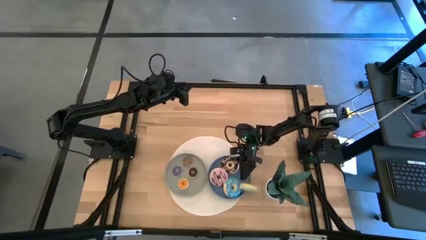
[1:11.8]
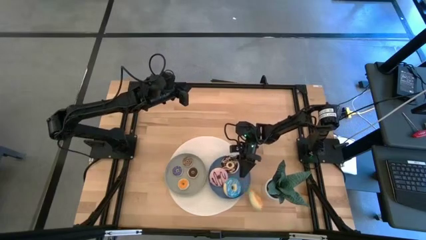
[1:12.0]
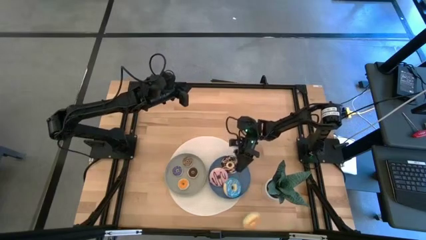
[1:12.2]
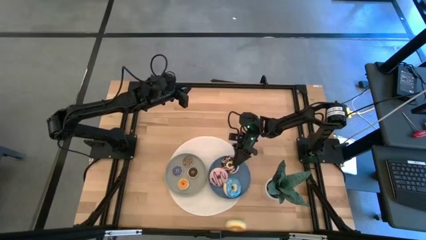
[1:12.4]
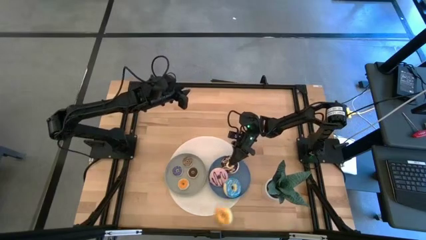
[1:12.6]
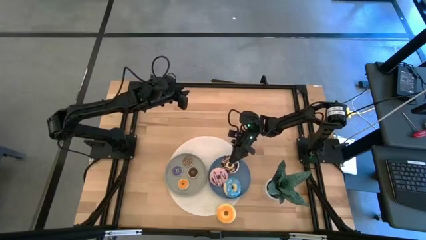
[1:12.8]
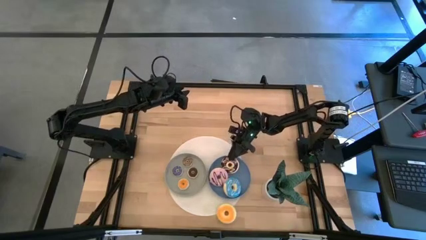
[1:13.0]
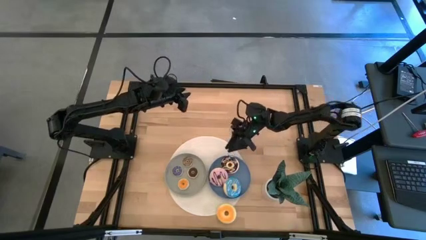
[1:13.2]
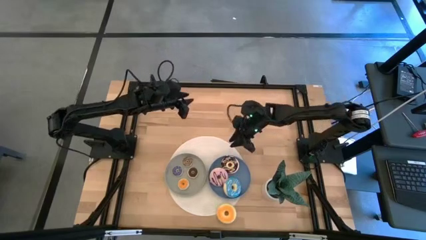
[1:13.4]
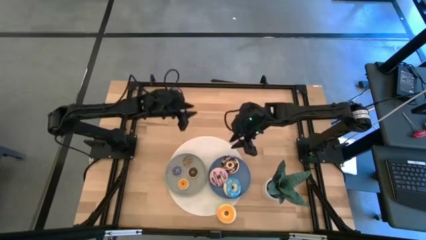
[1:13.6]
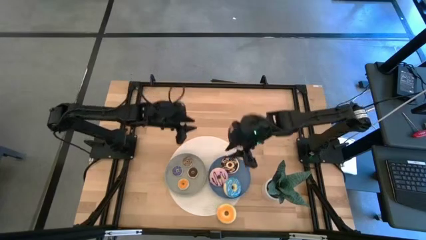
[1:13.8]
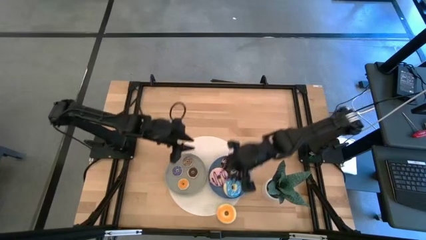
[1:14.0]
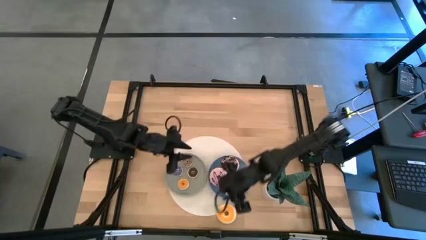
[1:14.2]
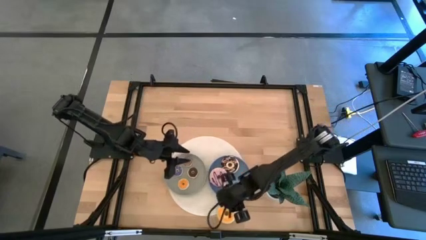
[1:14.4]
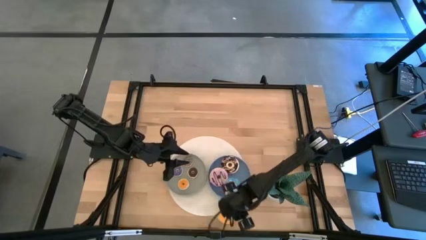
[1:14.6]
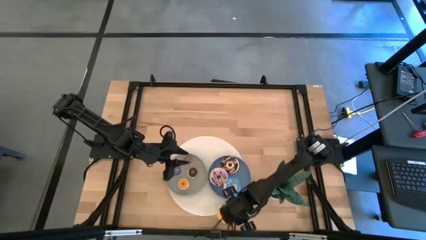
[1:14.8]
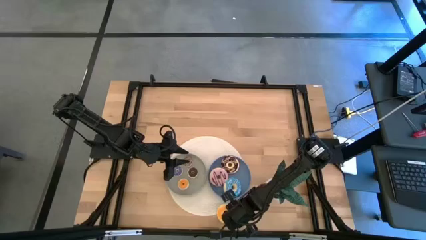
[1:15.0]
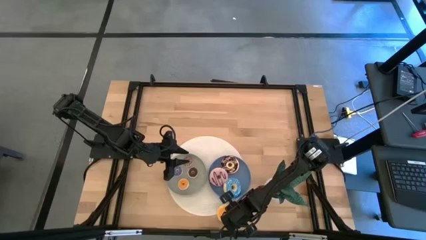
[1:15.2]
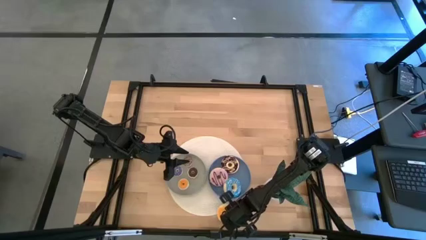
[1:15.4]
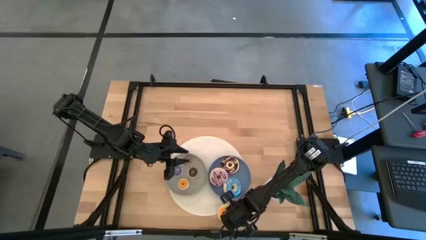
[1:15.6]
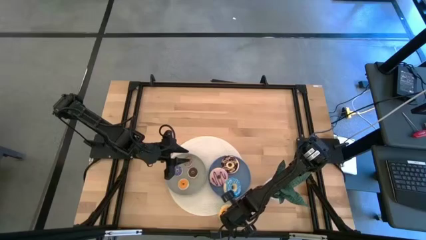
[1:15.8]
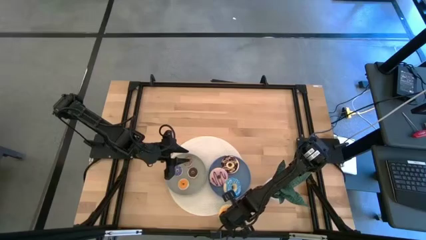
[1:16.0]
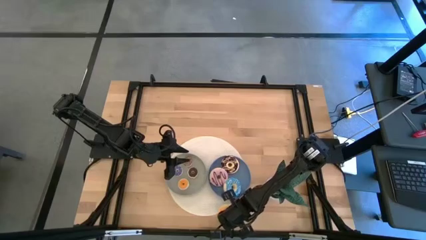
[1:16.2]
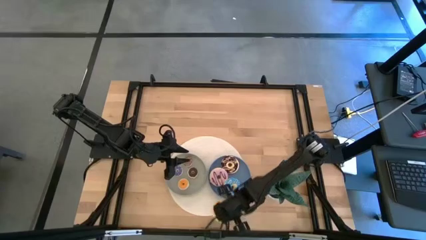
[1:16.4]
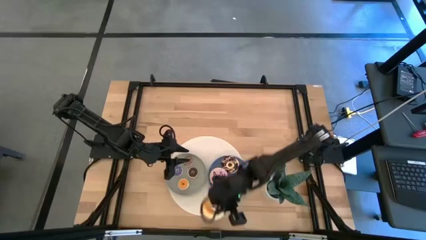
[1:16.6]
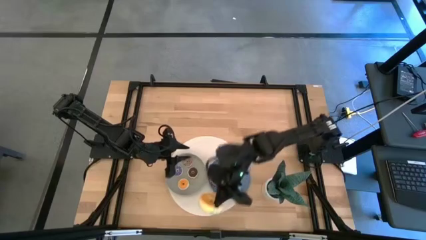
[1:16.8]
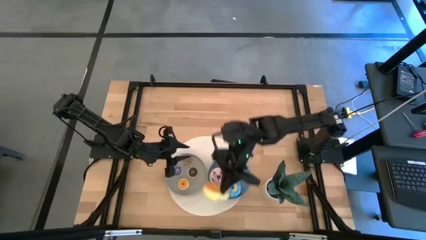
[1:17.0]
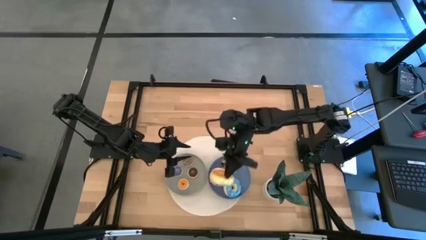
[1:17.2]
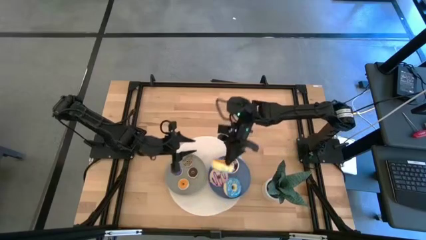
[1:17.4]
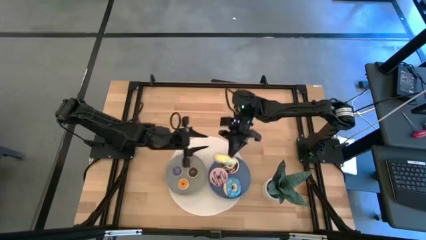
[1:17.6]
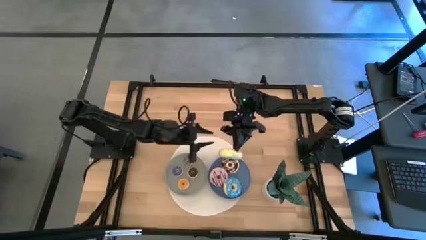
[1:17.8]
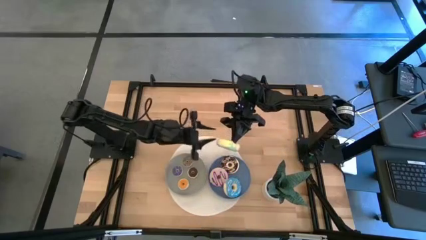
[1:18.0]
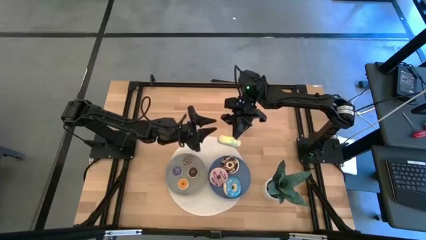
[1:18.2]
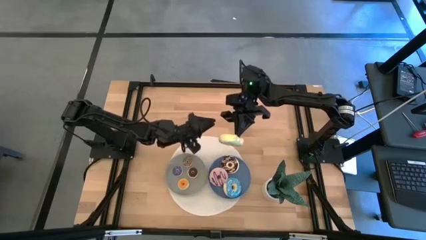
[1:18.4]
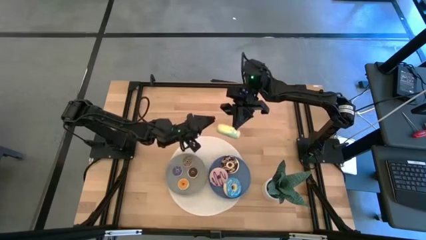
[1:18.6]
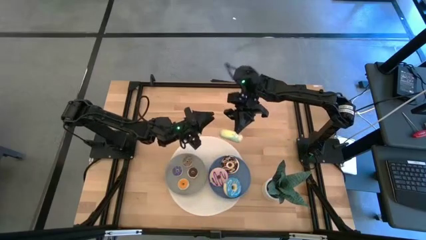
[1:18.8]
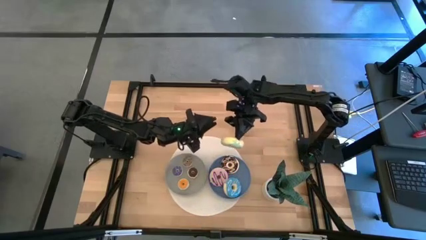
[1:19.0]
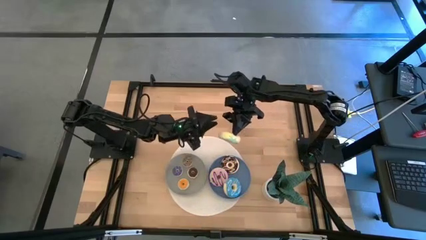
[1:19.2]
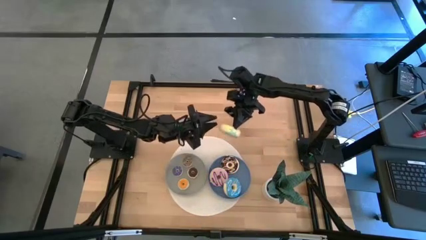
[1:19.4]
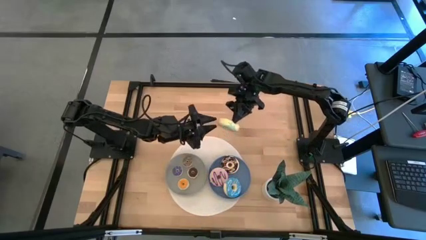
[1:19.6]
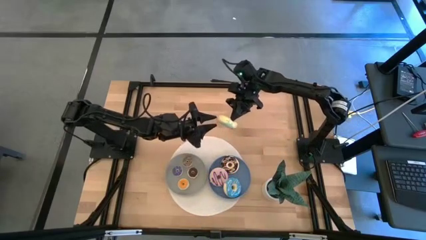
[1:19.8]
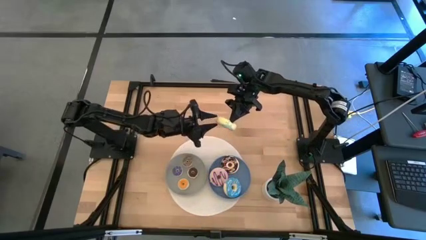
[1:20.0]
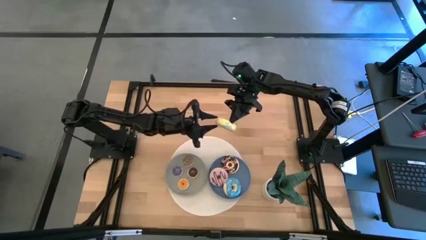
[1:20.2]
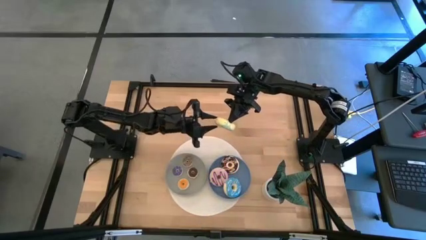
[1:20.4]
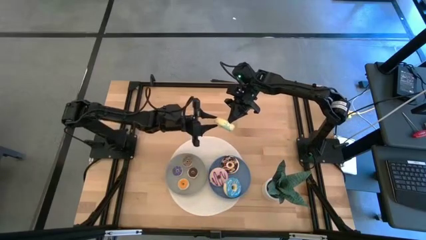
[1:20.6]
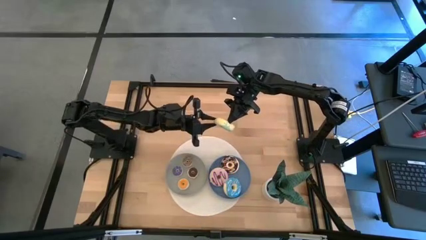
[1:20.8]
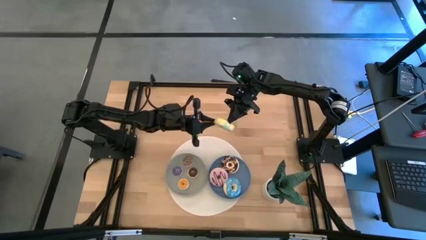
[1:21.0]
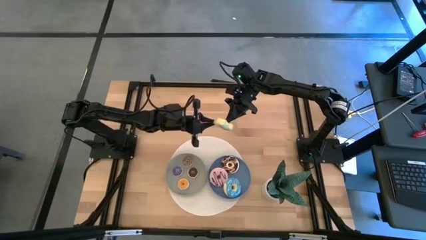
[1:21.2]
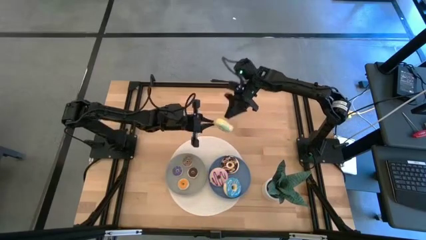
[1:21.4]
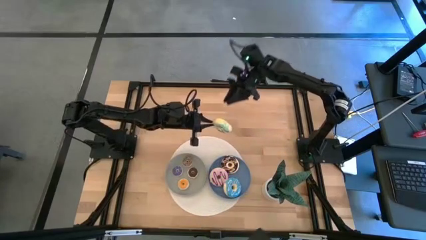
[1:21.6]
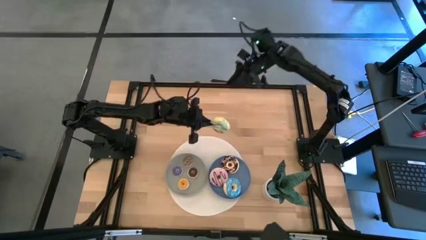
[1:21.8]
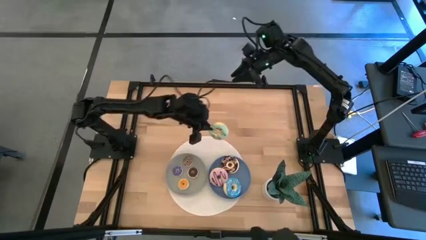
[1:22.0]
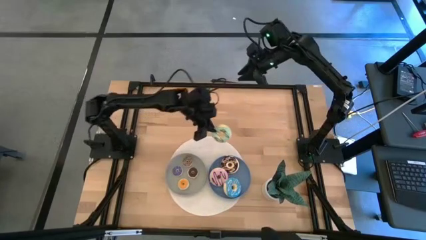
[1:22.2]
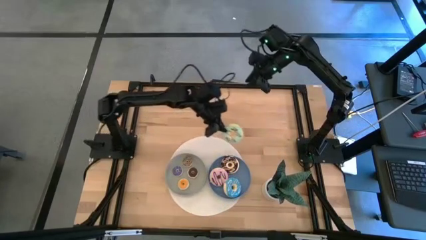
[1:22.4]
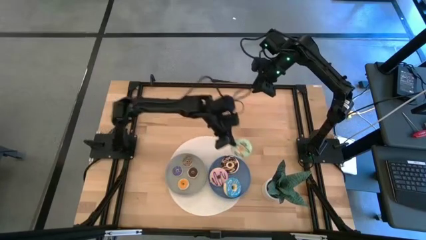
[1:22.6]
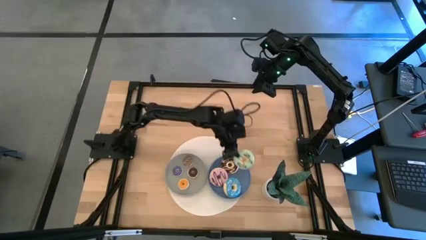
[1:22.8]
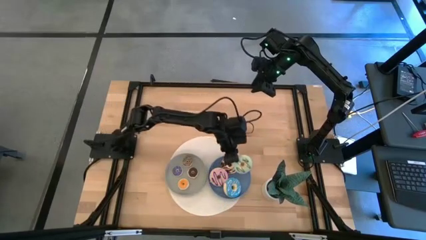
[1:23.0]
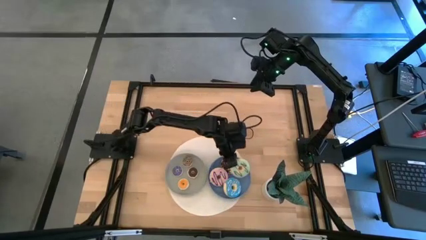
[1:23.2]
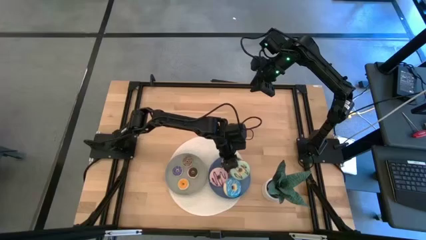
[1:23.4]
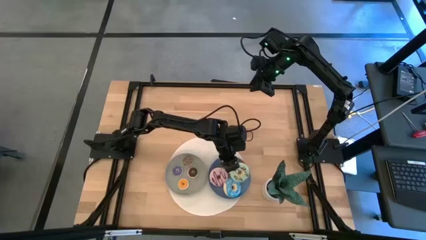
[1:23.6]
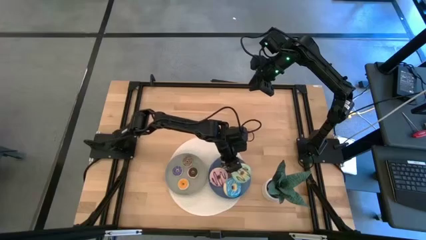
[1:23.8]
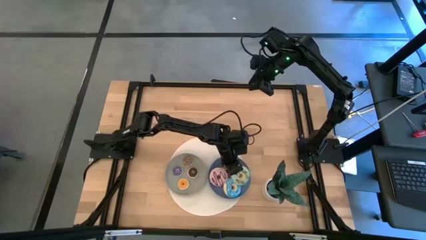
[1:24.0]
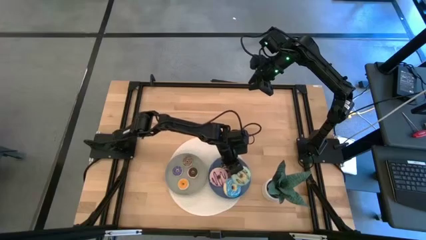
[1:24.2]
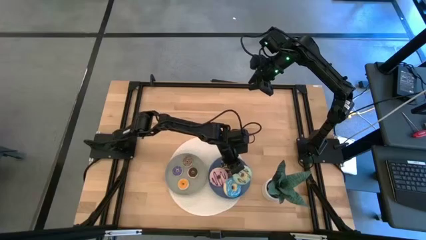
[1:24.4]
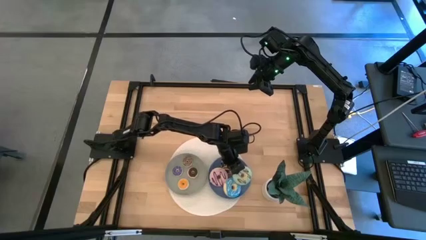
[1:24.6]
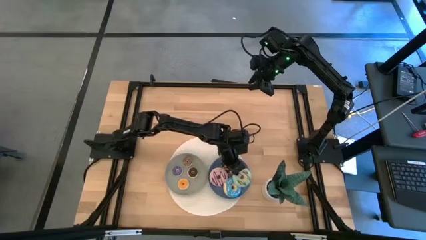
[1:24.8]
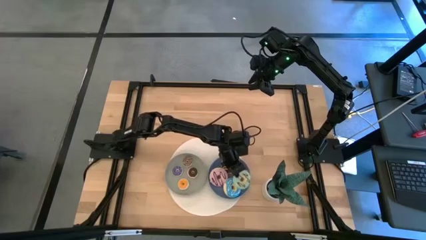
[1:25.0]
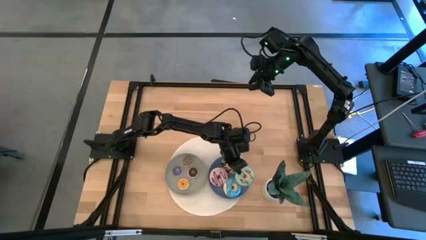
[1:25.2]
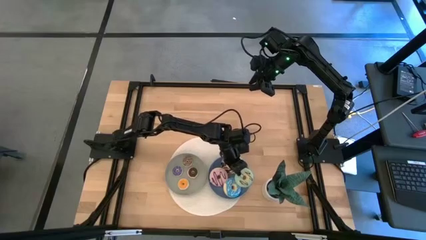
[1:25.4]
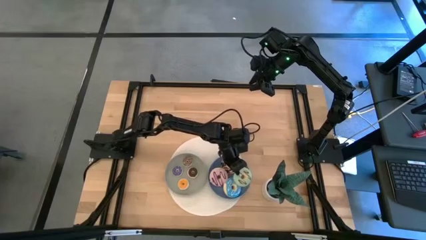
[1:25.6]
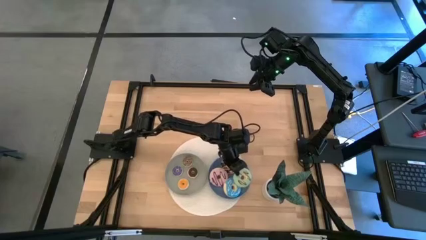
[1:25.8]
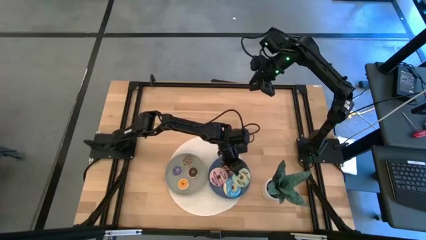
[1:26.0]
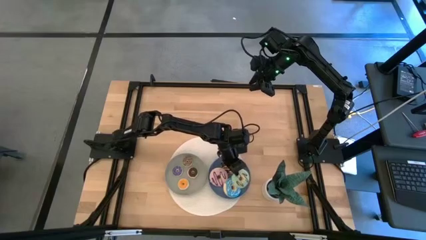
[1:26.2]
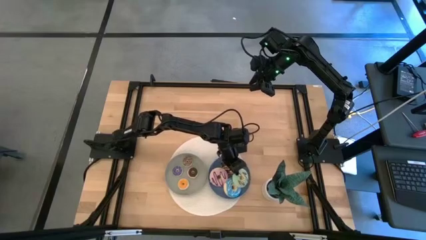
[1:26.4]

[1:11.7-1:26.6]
Task: Pick & Place donuts
Put the big green and blue donut on the blue plate

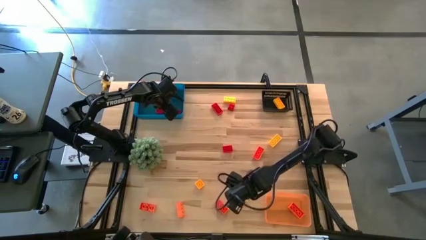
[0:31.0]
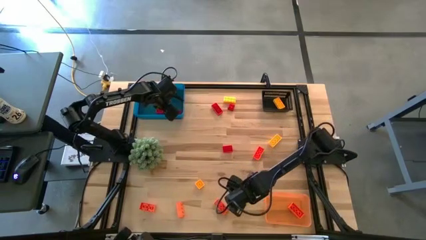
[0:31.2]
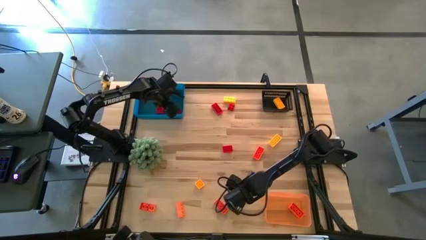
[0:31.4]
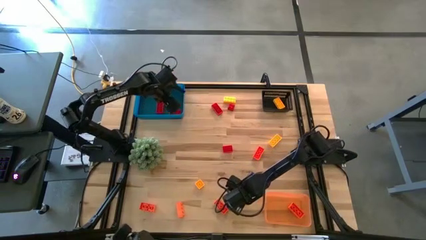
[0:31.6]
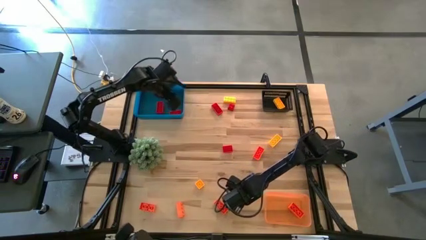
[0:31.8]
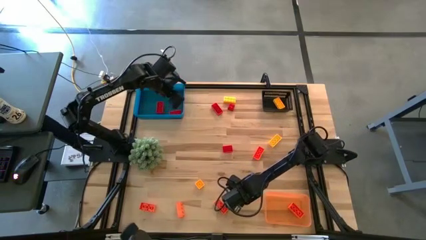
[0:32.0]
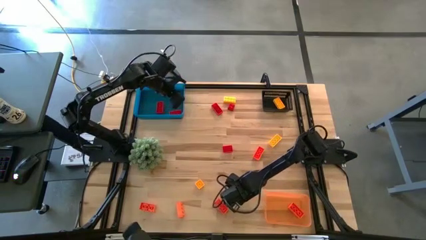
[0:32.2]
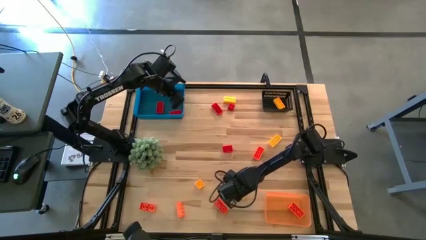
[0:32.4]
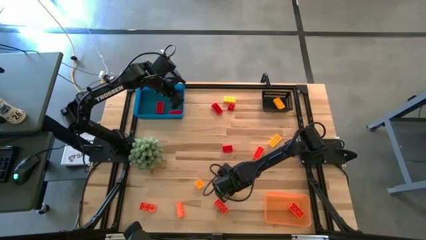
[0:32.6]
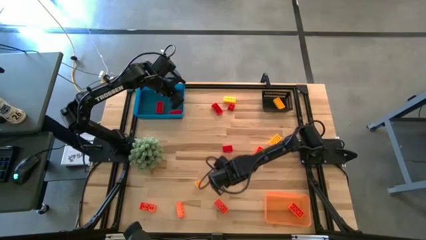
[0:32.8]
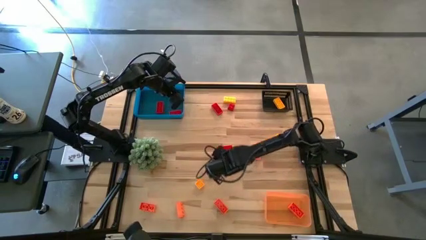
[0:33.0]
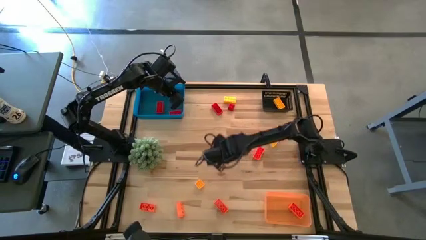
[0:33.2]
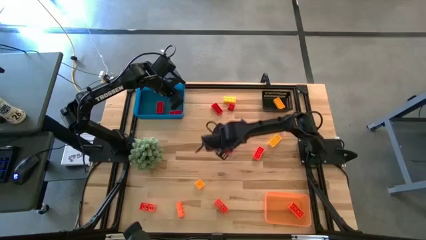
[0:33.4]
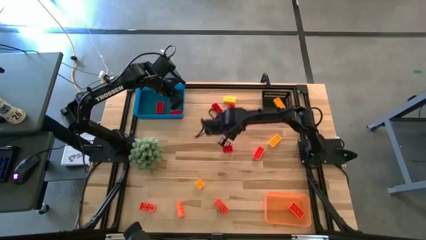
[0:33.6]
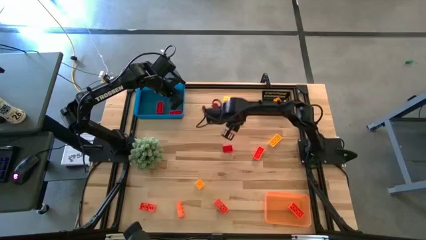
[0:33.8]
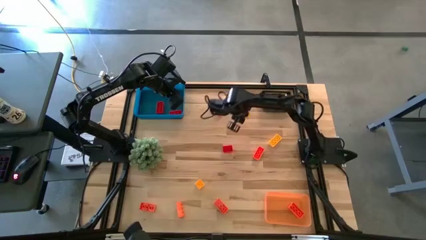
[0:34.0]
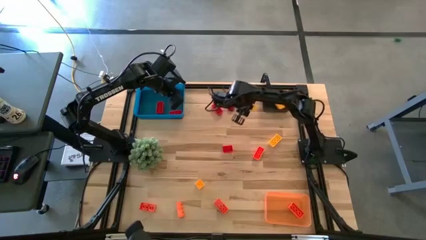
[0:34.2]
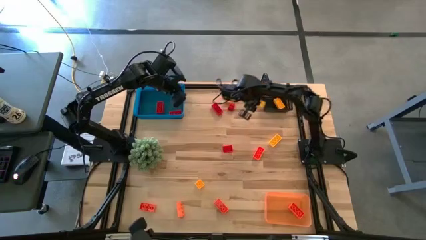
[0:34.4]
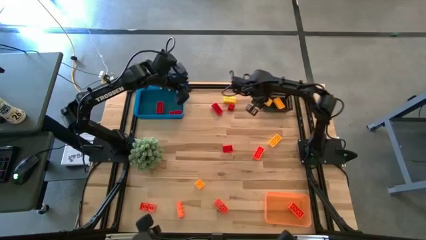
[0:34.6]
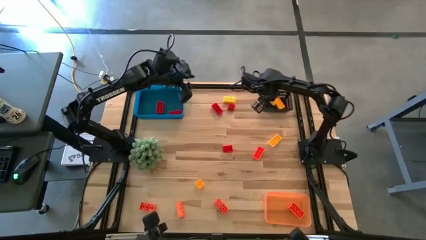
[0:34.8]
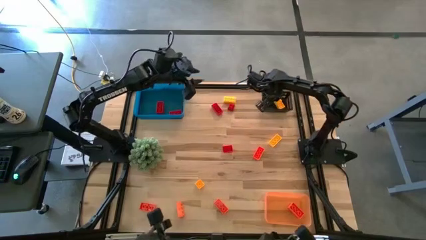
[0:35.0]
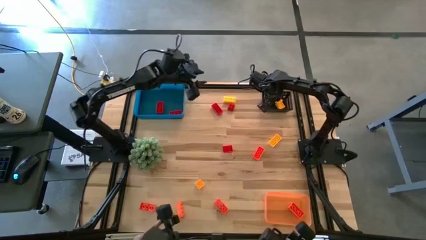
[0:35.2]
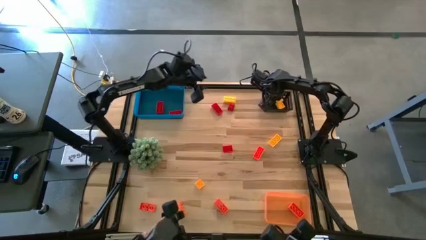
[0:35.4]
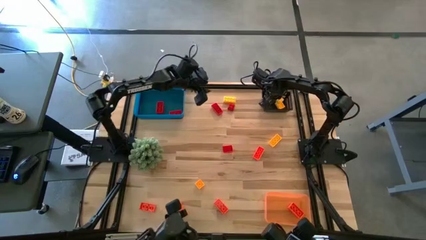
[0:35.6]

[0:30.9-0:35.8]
Task: Sort & place blocks by color
Put the yellow game piece into the black bin
